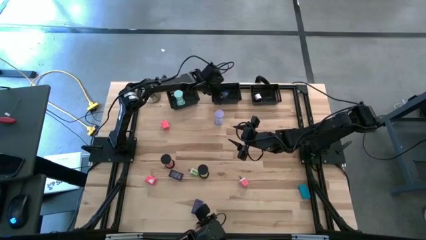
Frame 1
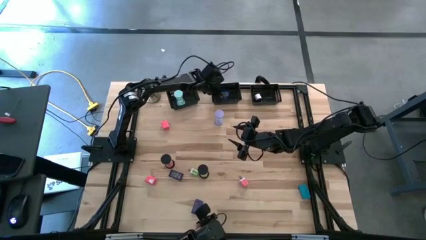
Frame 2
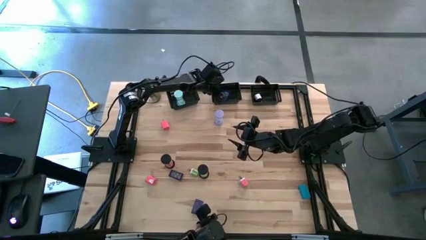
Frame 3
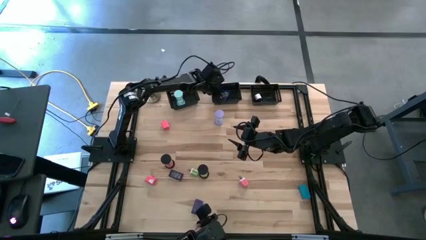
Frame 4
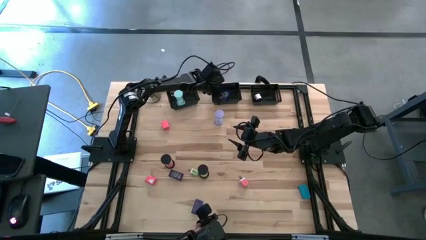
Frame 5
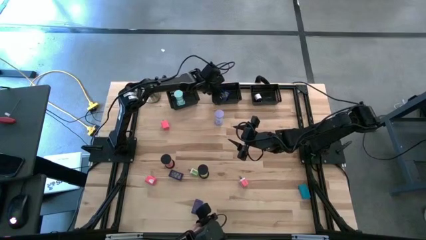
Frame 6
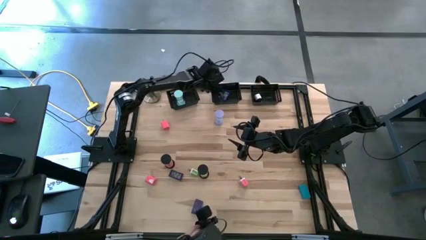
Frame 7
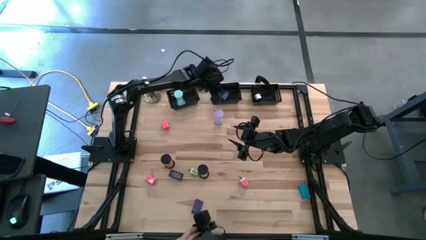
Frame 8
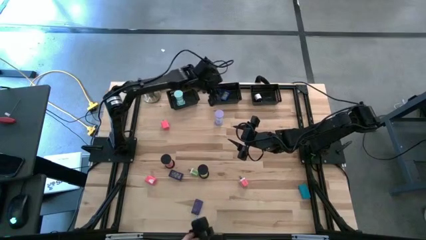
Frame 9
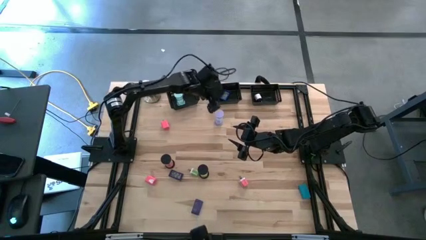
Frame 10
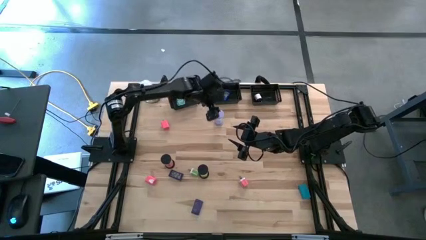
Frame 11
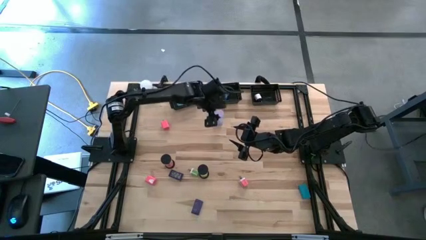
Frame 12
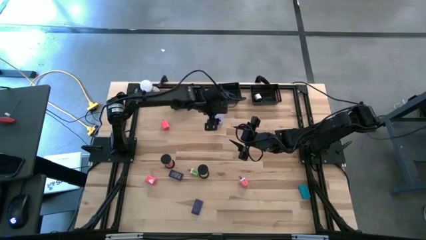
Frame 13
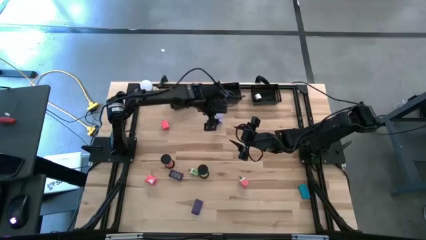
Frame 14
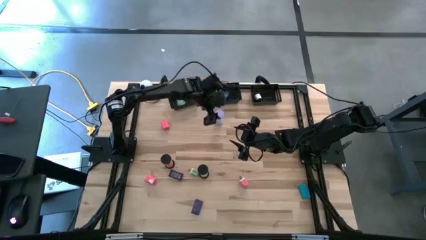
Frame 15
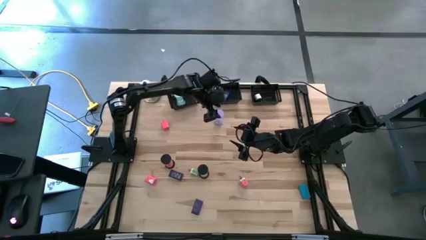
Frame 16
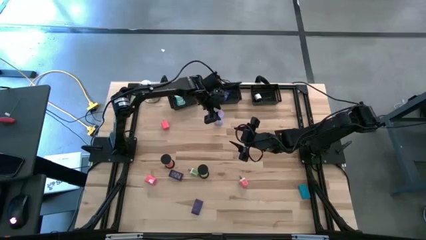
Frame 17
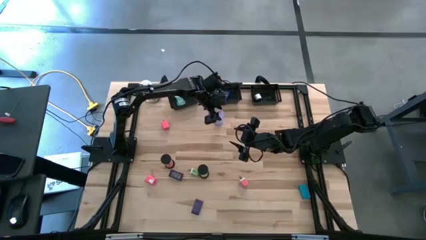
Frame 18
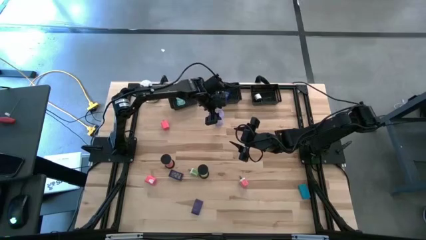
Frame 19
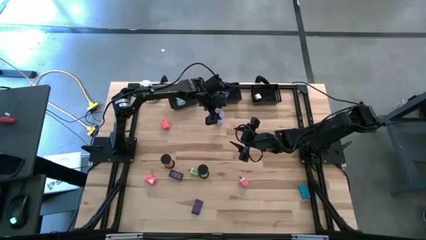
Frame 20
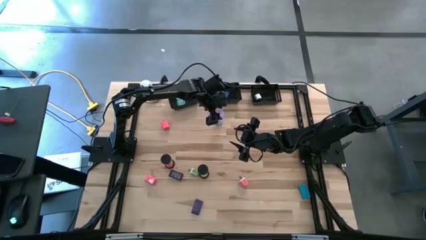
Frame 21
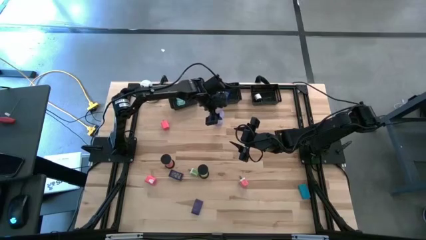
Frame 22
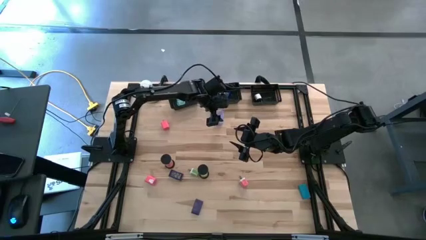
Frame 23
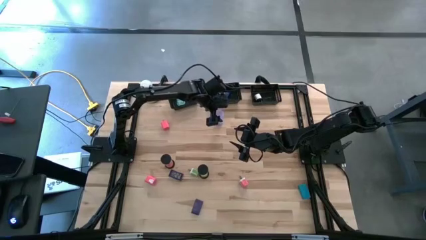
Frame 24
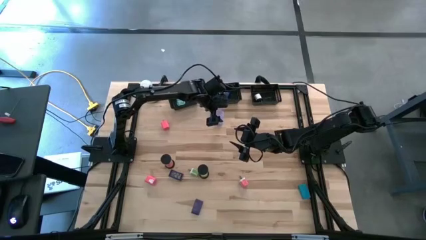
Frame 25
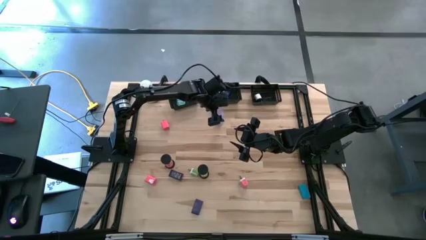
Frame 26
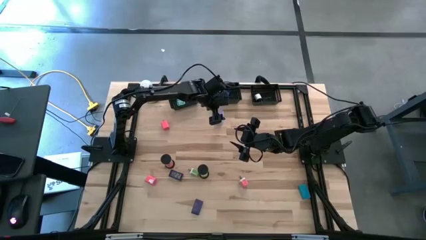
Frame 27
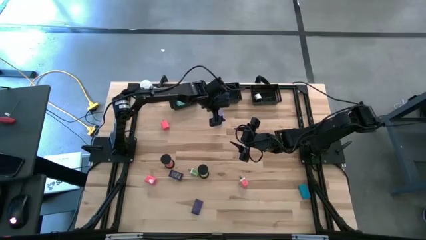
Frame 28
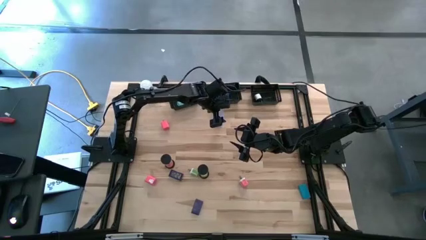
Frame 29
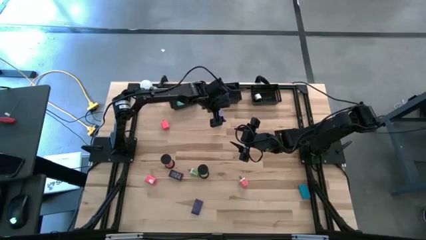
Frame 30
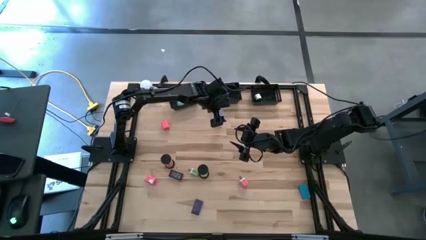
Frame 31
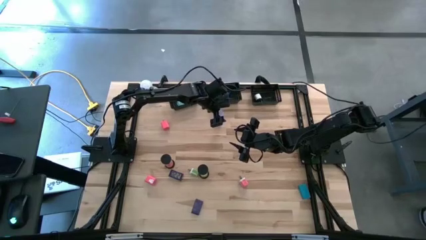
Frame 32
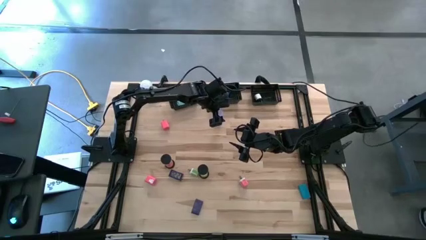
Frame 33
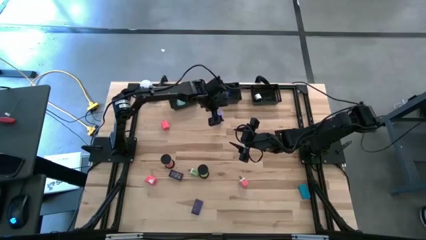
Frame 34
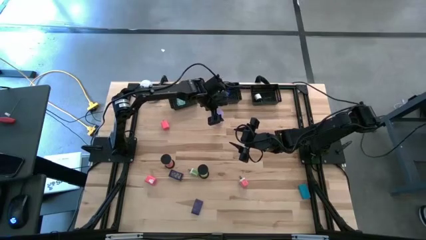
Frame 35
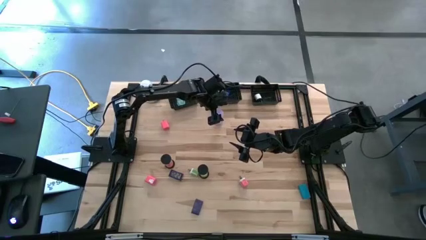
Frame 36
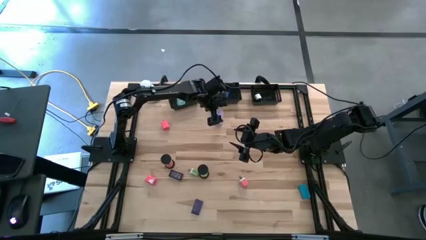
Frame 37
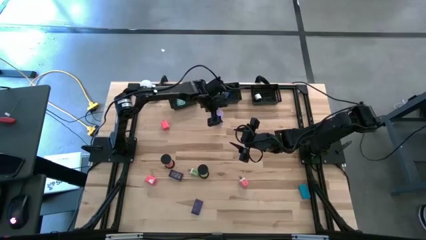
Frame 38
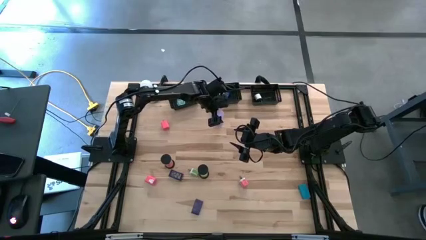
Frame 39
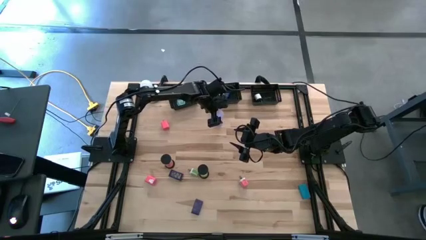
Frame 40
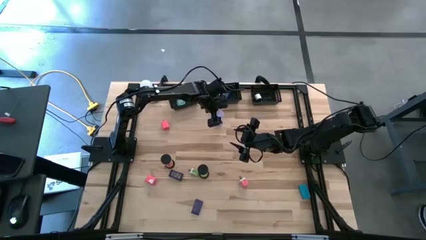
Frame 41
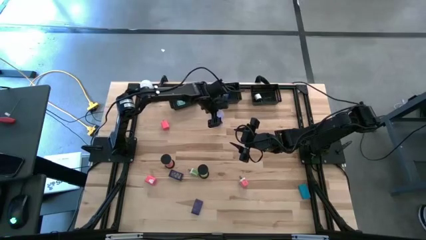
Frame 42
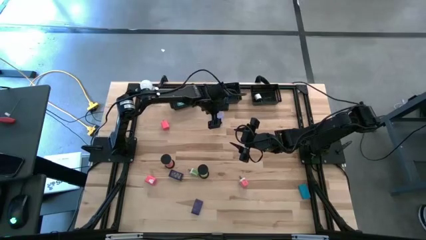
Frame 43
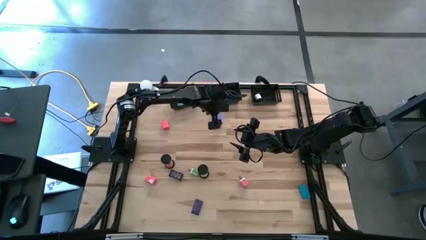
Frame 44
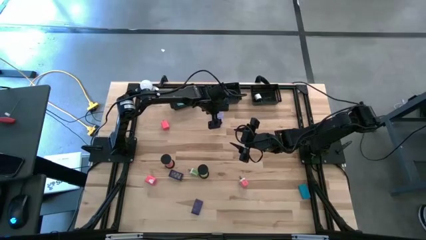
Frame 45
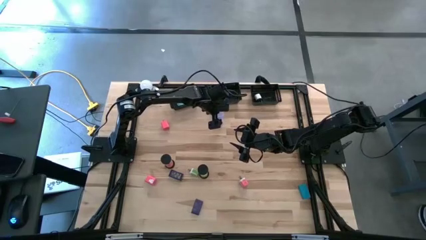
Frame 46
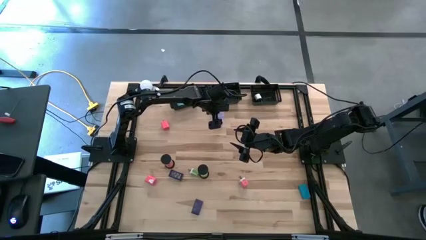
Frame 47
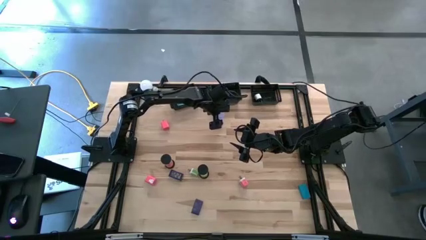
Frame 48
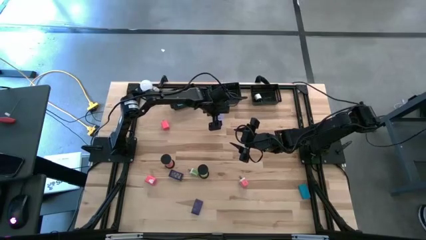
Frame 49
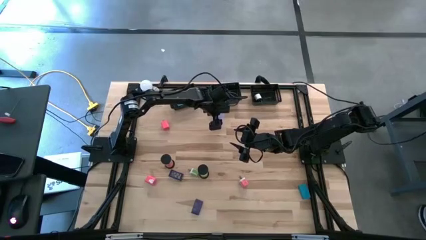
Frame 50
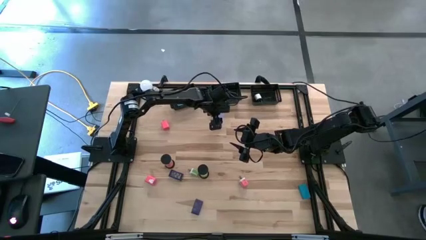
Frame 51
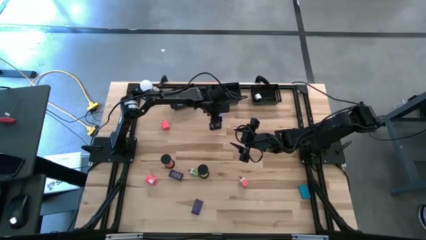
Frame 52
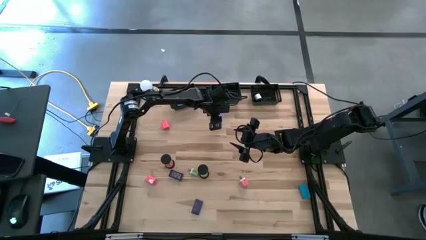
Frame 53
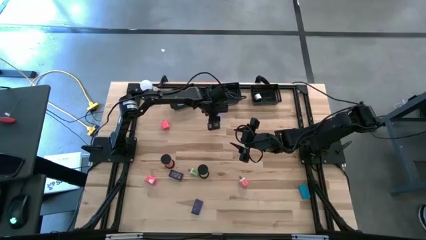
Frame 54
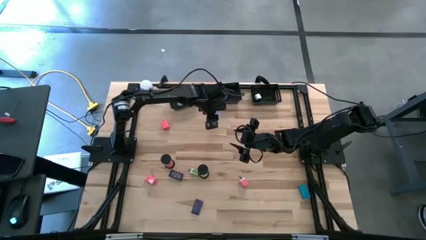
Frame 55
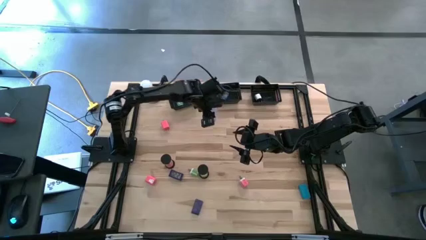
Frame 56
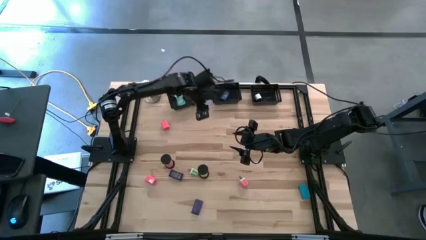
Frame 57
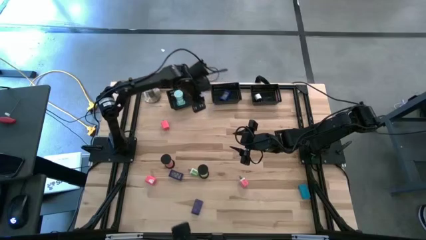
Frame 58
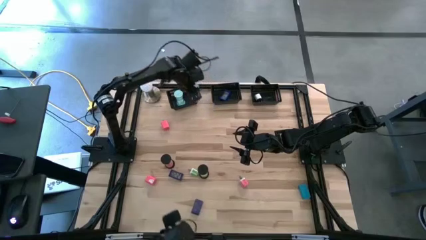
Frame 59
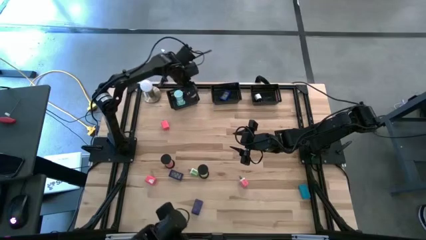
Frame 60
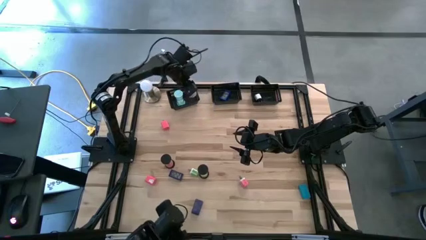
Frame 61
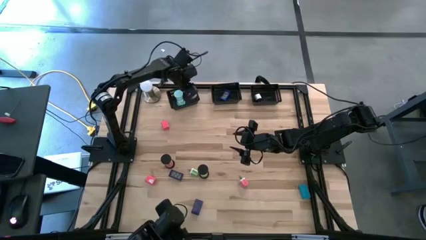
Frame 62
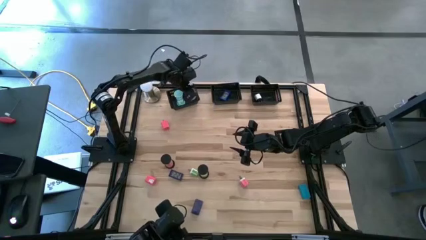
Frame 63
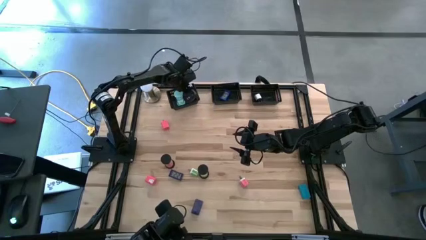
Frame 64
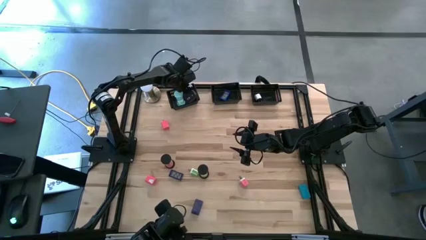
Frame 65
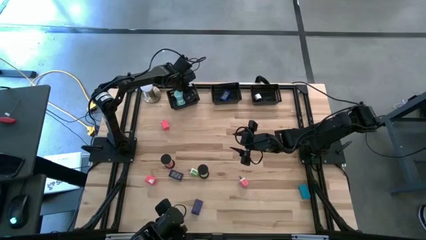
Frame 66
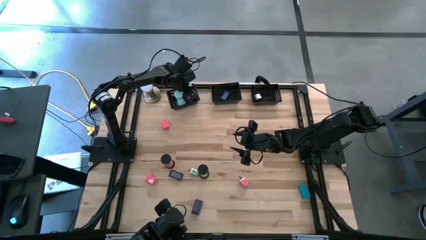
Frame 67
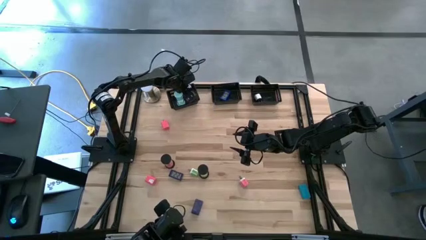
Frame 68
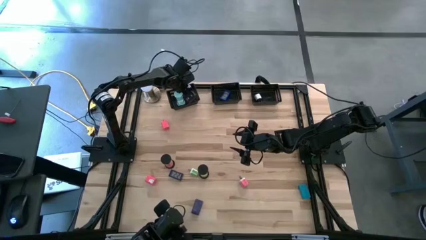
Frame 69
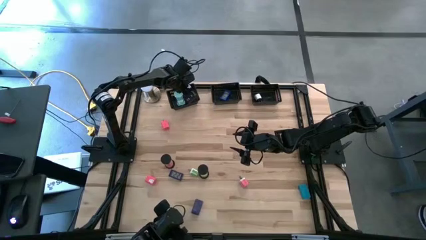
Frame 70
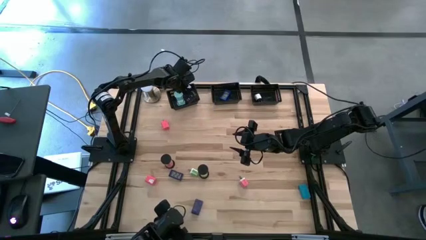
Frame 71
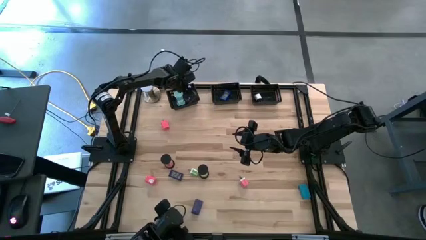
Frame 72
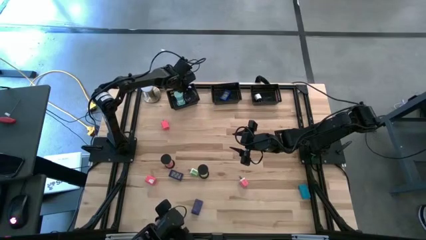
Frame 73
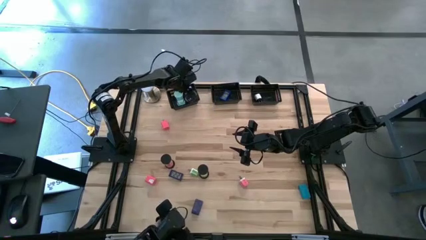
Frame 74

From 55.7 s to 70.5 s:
Task: Pick & Place Office items
Put the violet hourglass into the left black bin
